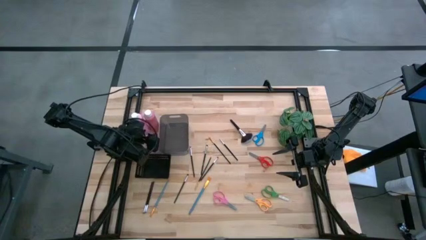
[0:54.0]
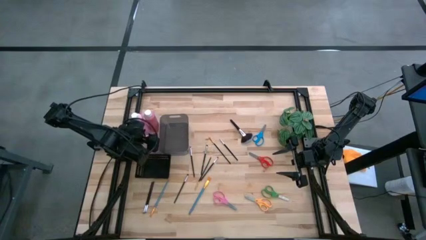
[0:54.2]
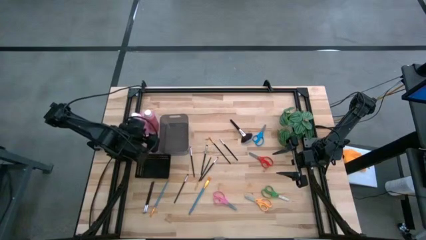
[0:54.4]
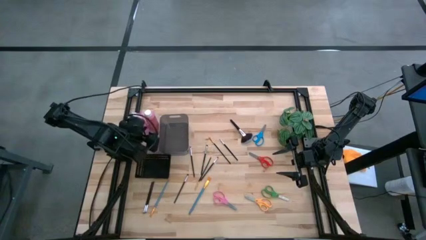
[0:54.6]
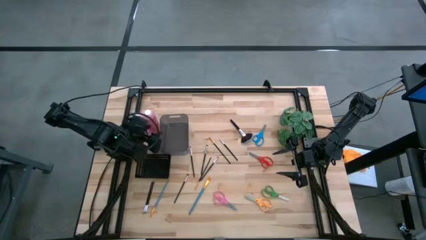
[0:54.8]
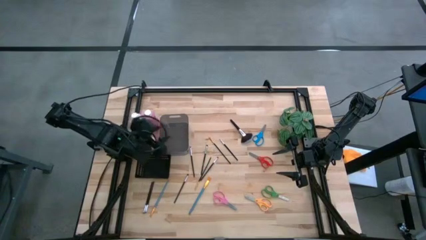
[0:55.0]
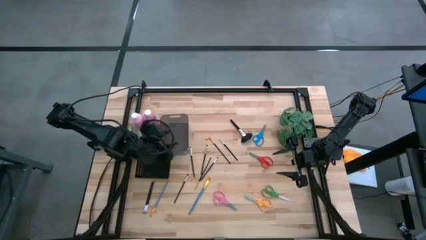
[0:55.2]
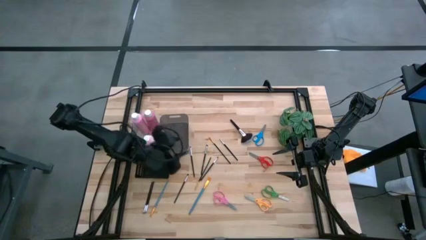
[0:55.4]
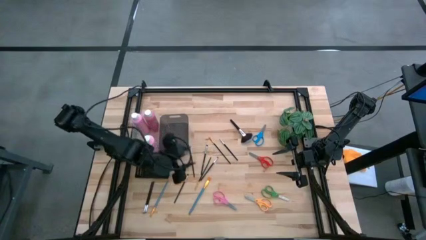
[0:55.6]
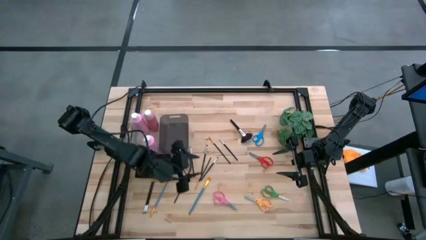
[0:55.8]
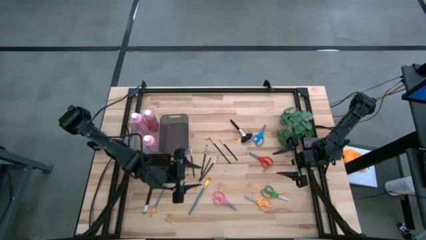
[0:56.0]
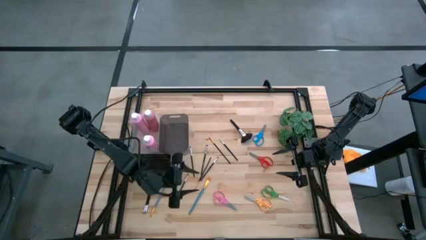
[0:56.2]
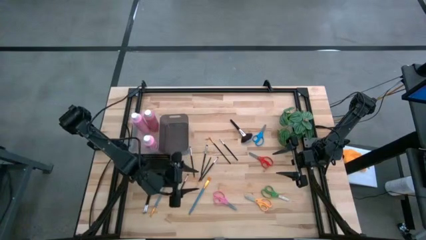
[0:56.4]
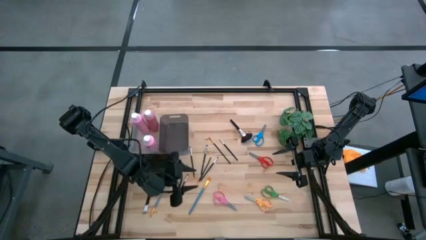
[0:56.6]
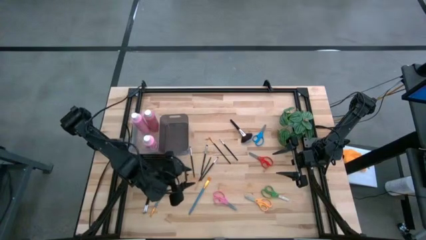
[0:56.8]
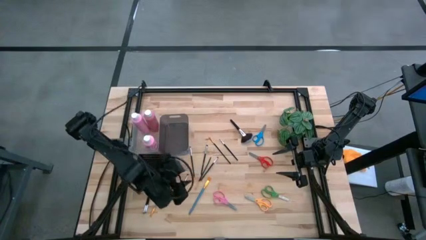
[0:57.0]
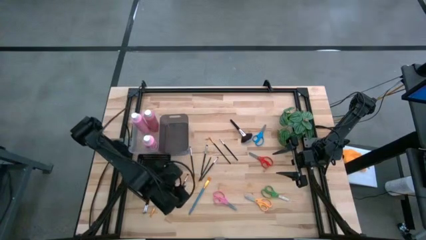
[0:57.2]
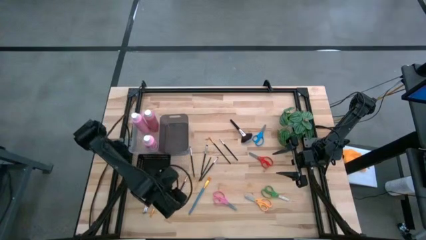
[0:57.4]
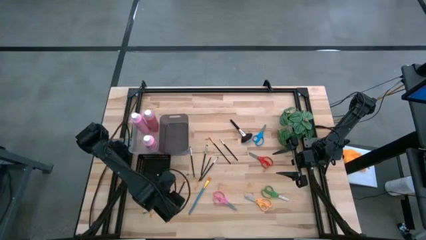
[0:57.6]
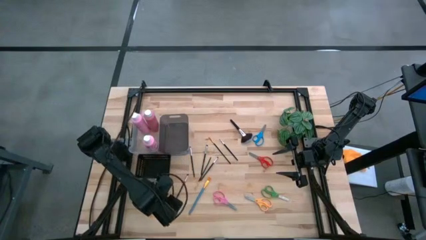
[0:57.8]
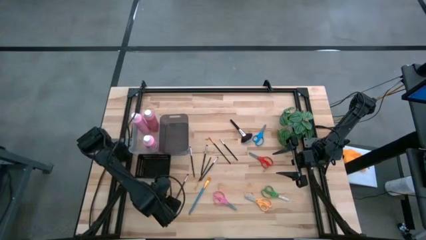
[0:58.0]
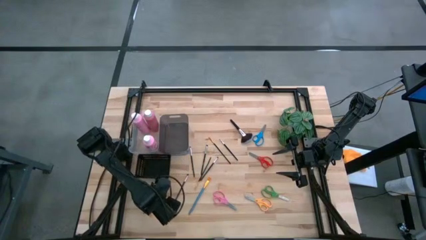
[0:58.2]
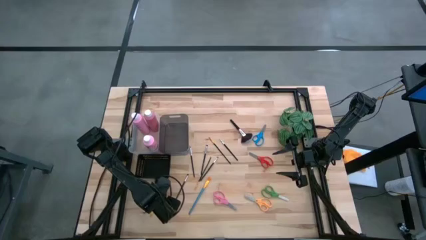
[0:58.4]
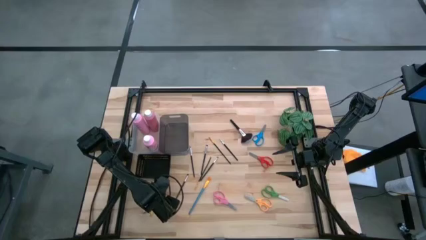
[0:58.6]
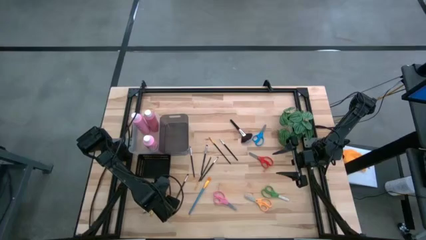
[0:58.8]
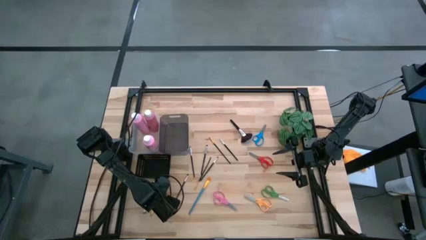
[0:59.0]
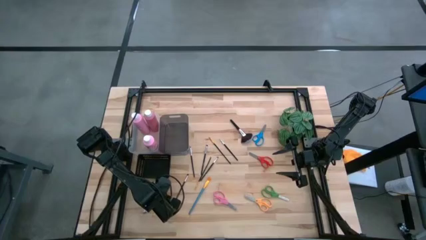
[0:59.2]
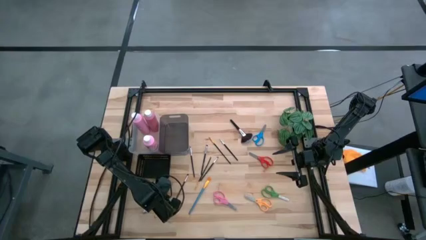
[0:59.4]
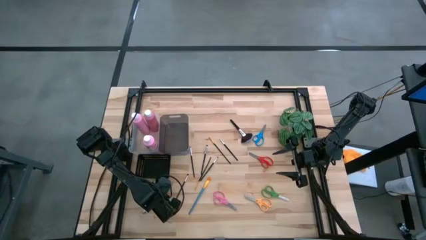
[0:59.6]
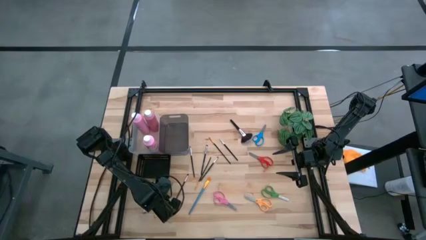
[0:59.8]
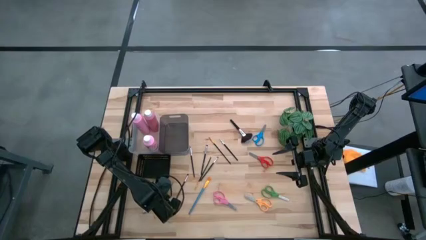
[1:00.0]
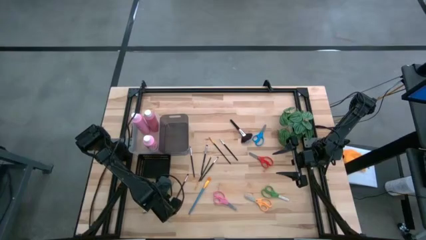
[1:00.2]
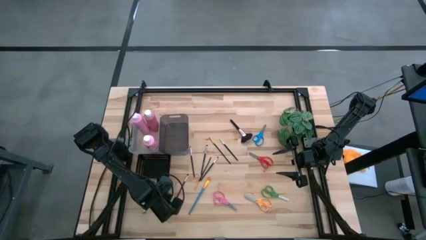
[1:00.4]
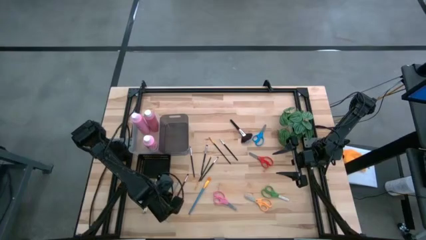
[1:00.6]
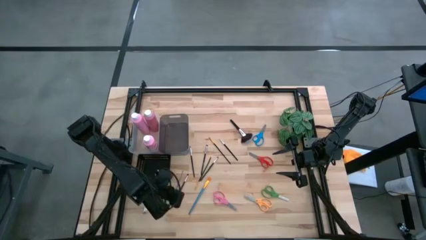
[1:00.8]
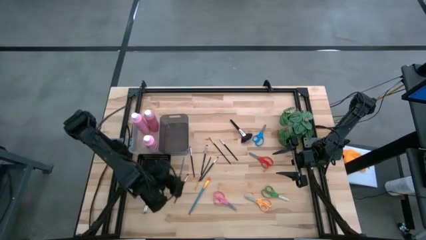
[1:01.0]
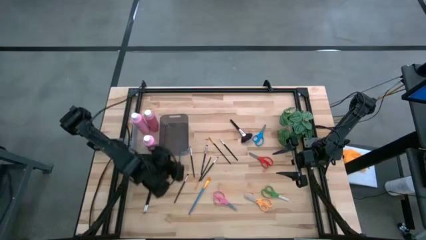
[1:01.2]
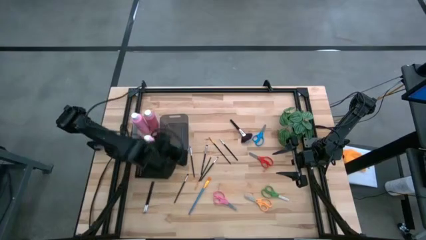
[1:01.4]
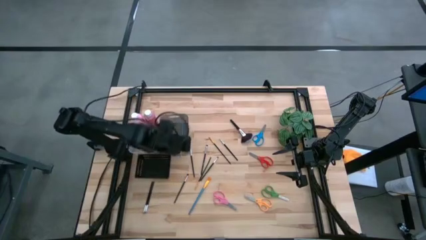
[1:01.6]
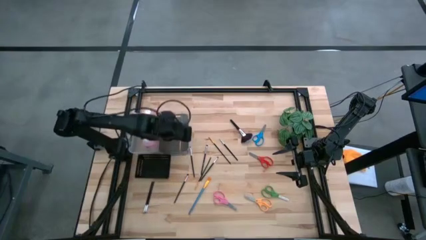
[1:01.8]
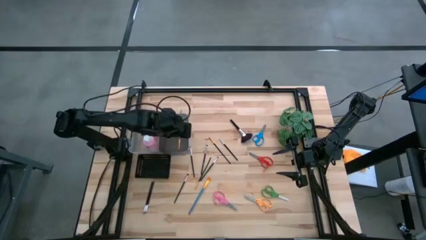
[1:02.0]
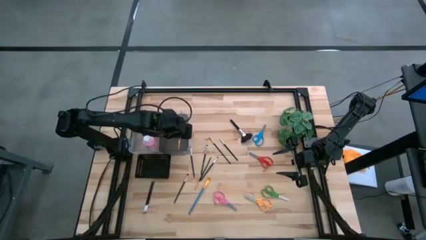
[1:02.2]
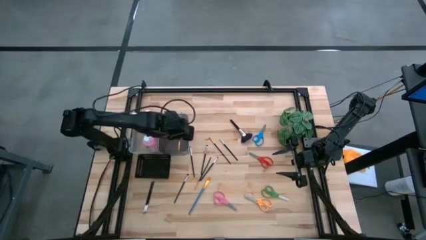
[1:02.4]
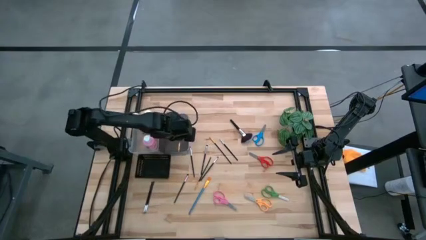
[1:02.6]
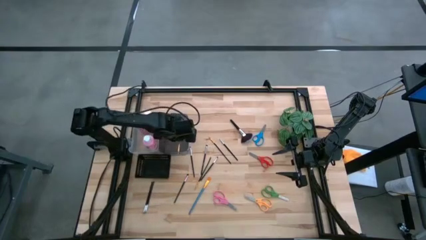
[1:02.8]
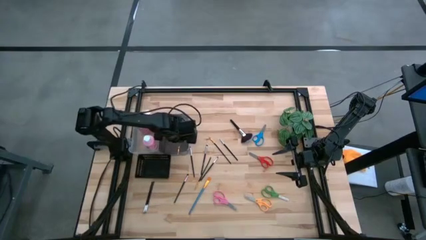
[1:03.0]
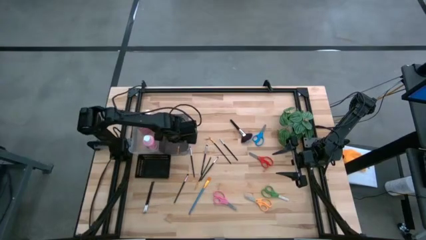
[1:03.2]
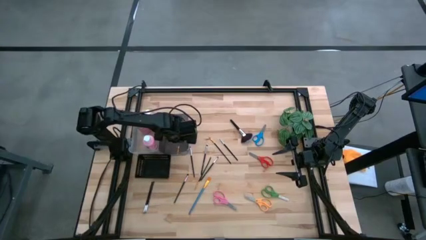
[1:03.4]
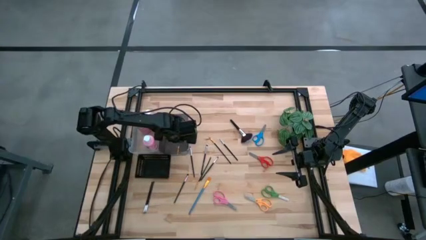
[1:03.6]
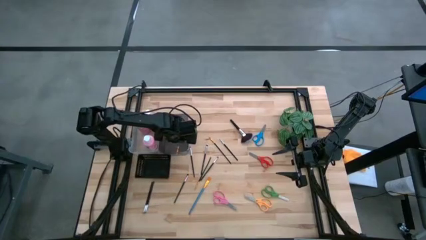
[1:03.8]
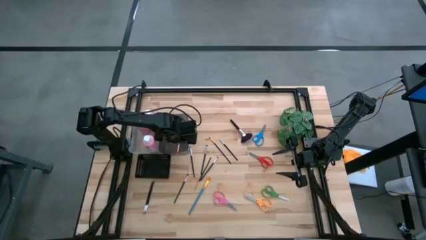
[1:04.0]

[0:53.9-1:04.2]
Task: Pick & Place Paint Supplies
Put the left blue brush into the black bin
